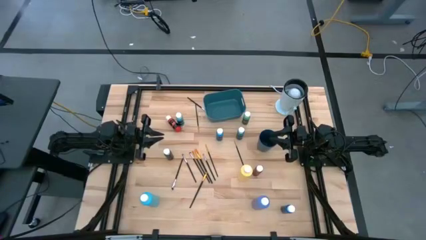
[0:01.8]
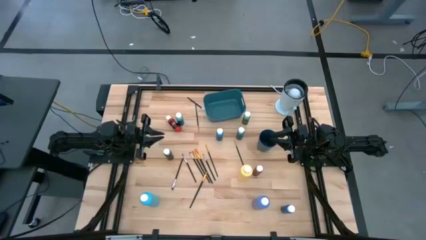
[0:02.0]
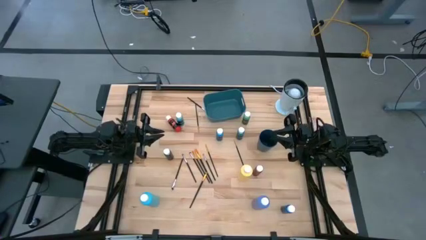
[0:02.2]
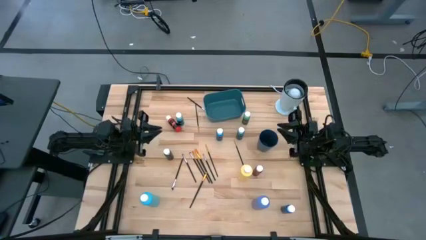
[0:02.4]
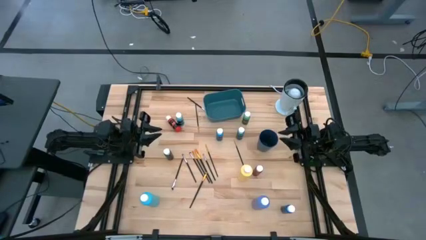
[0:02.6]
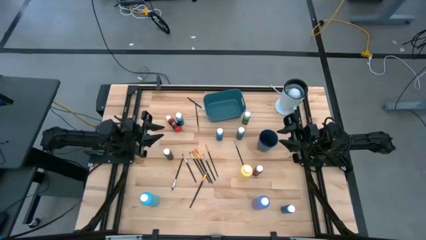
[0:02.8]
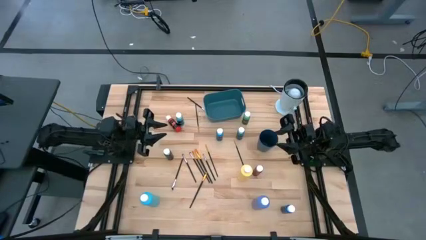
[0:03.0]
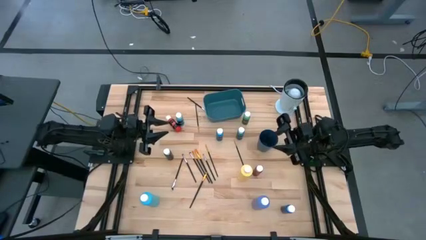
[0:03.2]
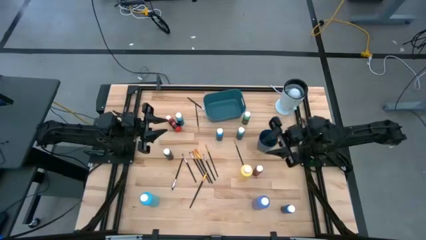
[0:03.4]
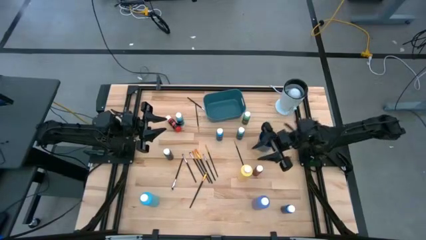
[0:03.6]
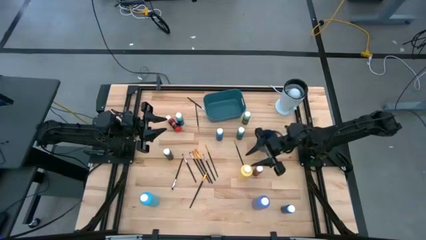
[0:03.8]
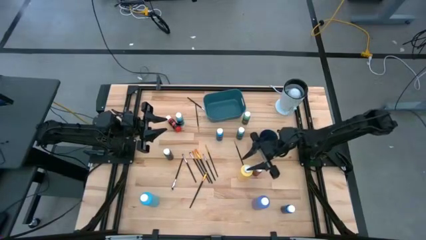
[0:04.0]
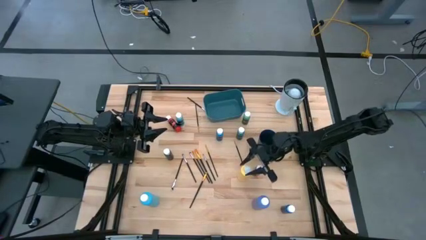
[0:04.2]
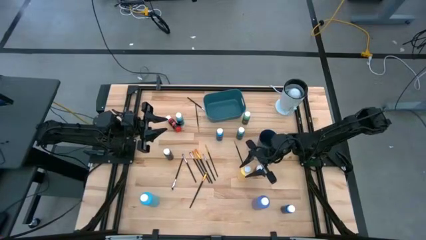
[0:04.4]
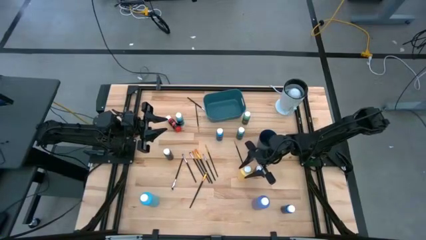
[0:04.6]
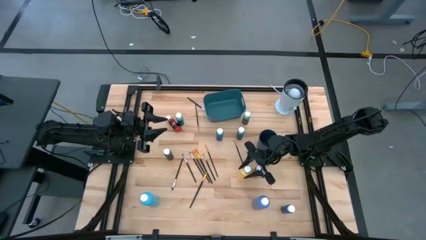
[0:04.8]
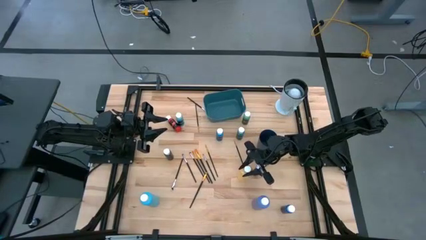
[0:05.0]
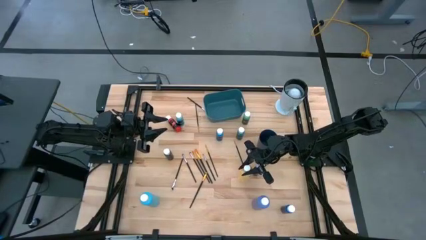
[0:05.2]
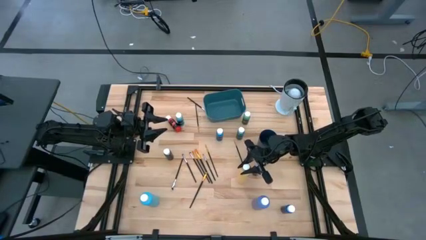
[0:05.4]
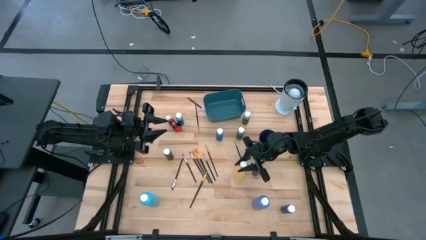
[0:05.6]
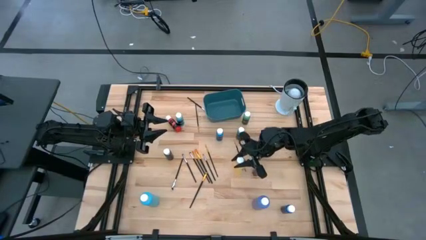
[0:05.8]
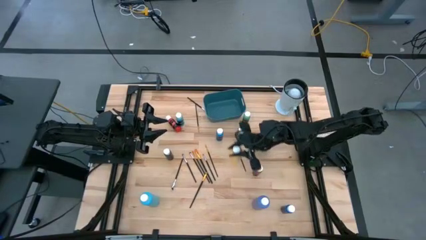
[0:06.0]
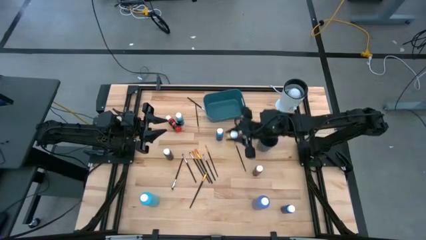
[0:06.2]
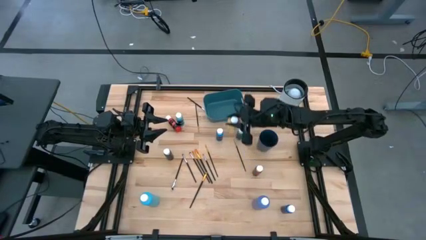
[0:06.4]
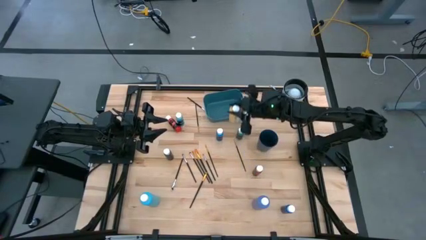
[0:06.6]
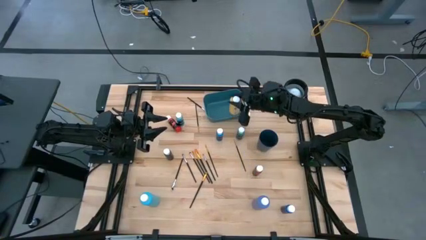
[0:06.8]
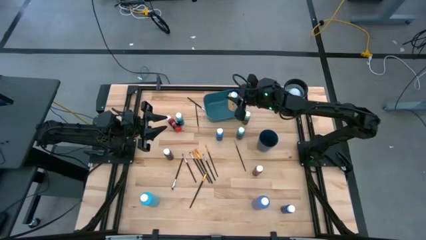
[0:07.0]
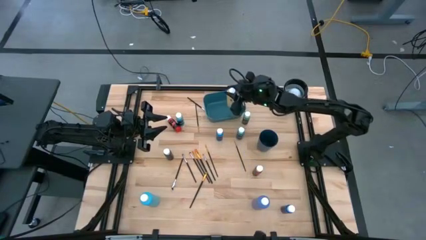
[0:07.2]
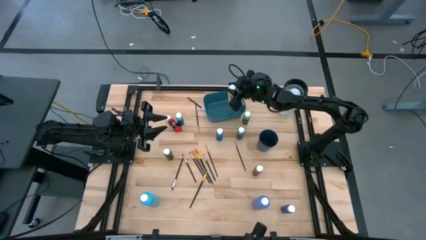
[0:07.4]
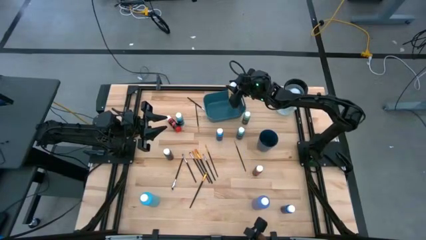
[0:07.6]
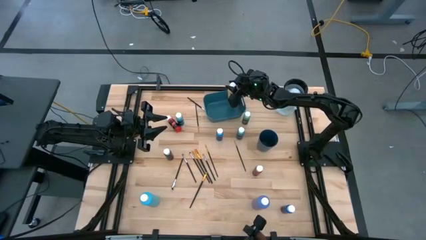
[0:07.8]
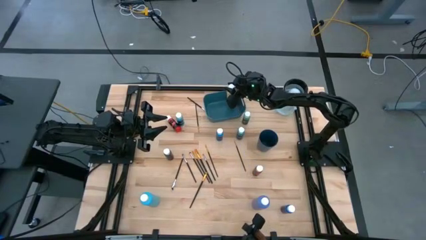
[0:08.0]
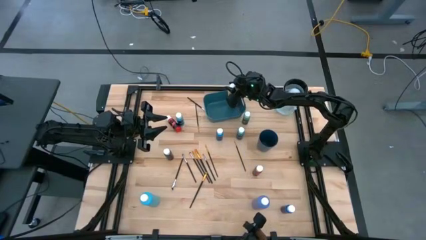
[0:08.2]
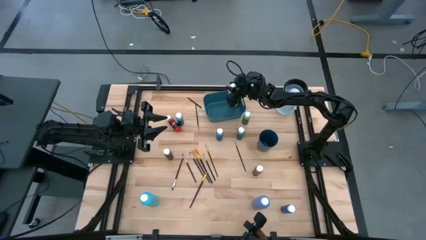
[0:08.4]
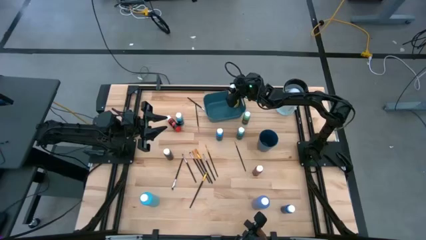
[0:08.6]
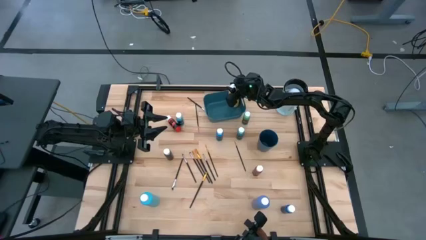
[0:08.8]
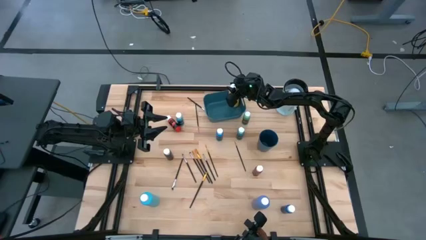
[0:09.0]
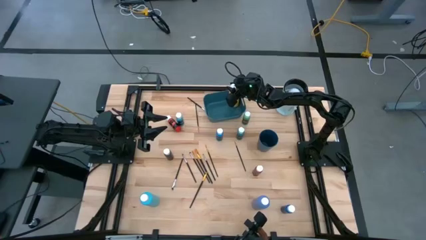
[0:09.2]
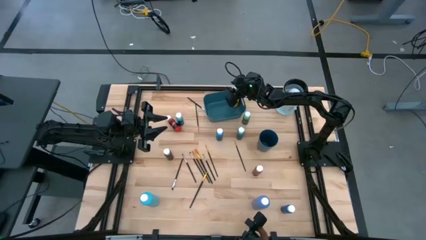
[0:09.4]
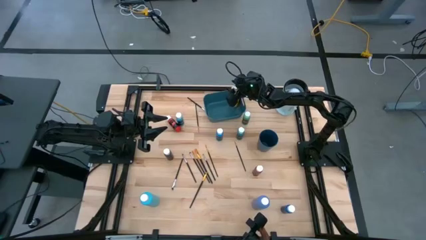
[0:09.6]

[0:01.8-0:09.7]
Task: Pick & Place Paint Supplies
Put the yellow paint bottle into the blue bin

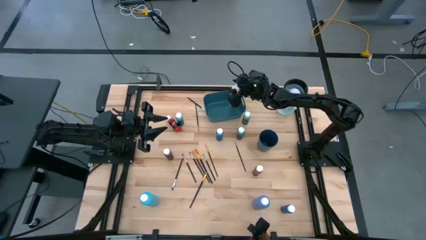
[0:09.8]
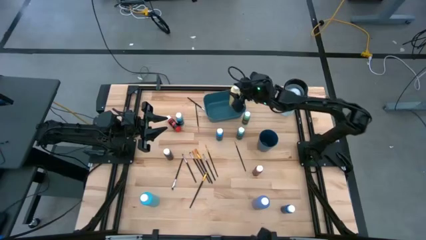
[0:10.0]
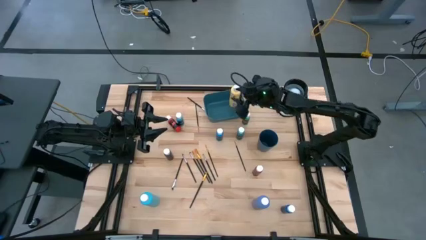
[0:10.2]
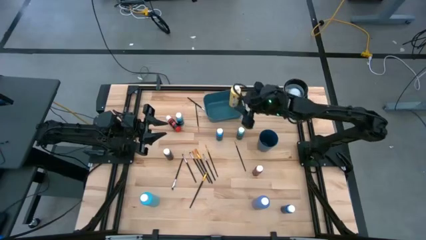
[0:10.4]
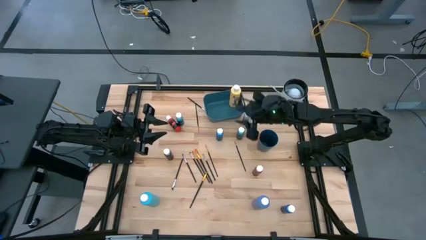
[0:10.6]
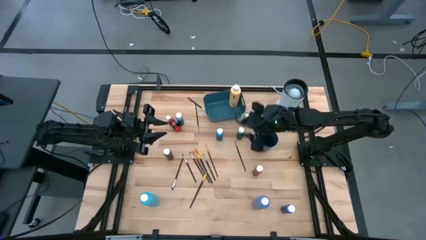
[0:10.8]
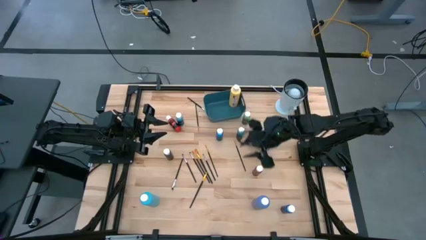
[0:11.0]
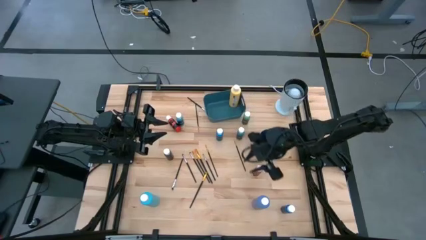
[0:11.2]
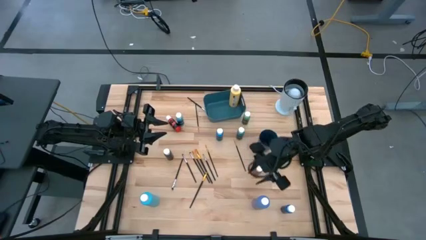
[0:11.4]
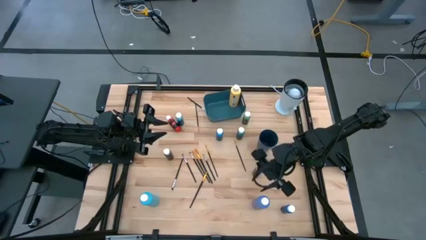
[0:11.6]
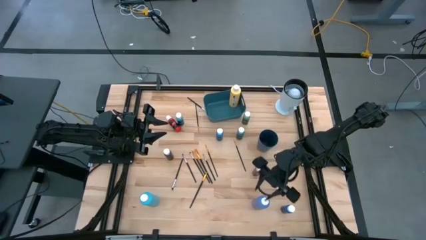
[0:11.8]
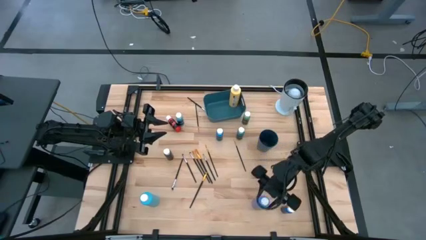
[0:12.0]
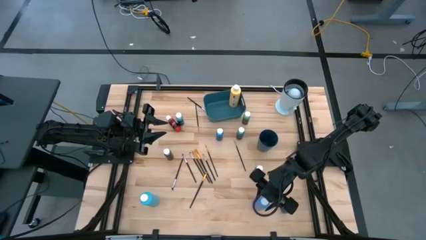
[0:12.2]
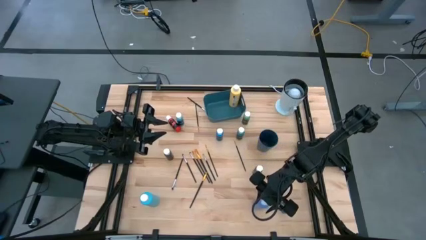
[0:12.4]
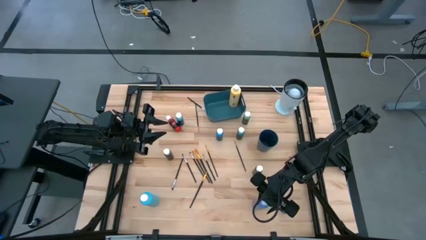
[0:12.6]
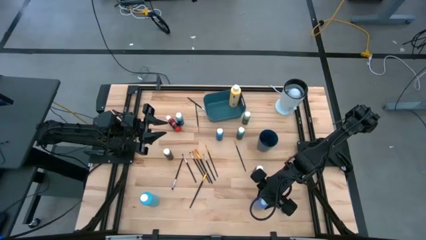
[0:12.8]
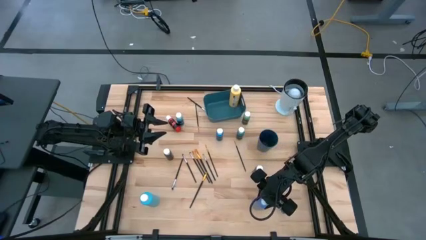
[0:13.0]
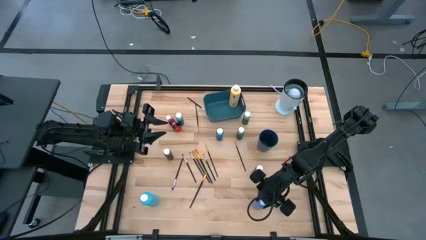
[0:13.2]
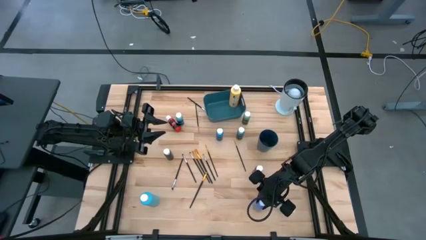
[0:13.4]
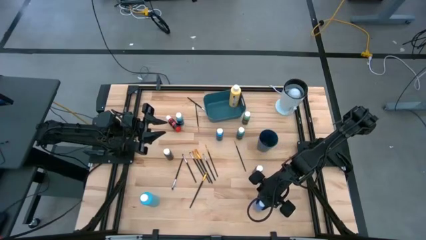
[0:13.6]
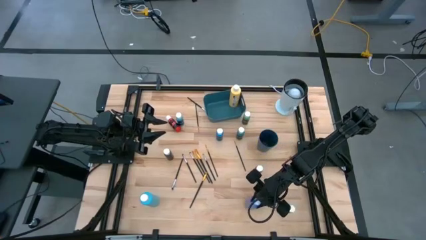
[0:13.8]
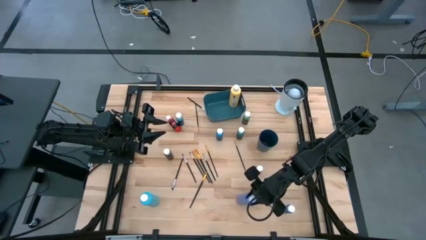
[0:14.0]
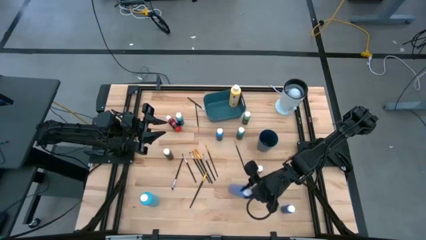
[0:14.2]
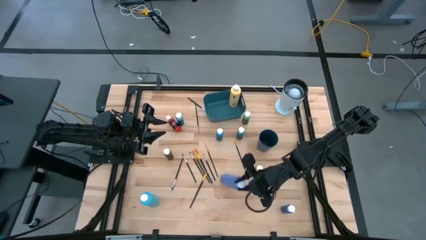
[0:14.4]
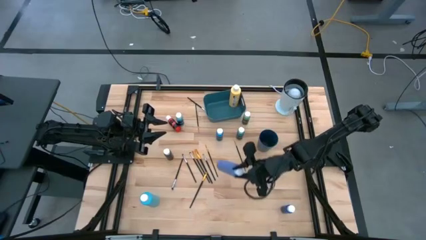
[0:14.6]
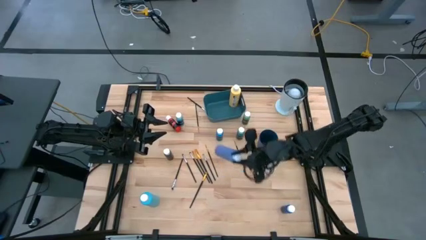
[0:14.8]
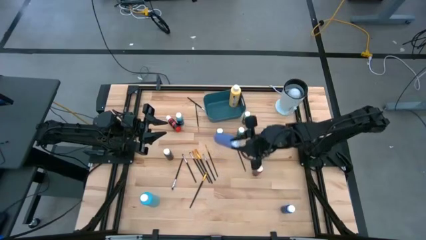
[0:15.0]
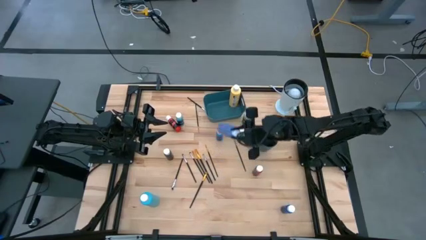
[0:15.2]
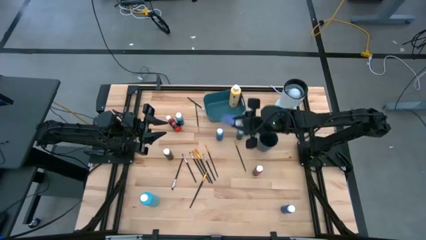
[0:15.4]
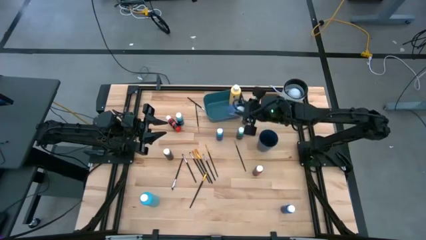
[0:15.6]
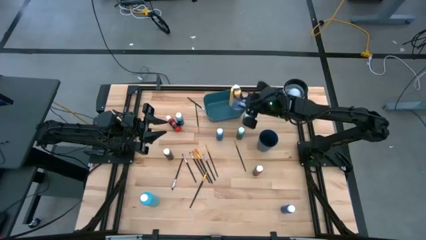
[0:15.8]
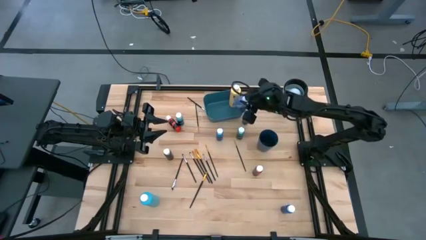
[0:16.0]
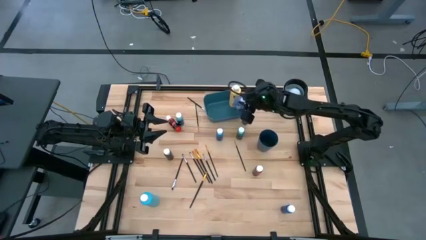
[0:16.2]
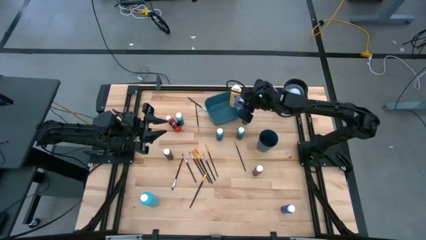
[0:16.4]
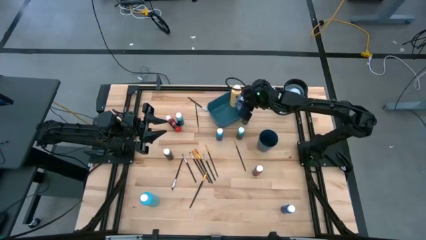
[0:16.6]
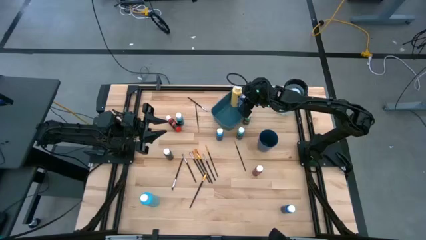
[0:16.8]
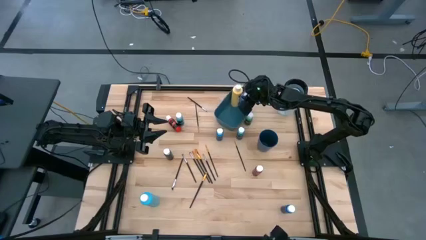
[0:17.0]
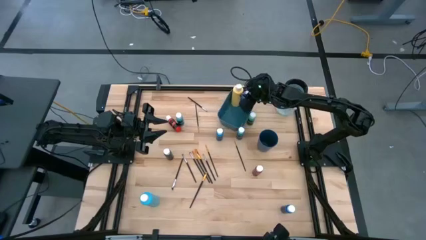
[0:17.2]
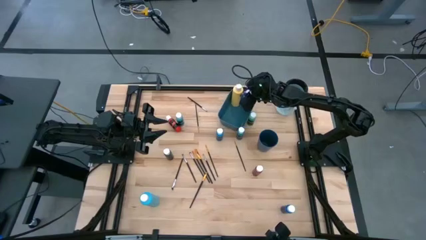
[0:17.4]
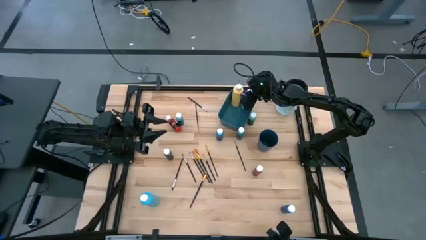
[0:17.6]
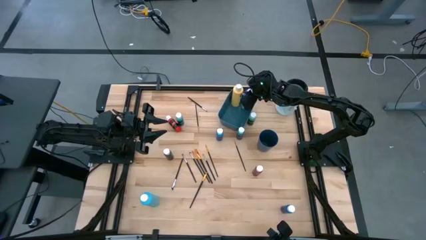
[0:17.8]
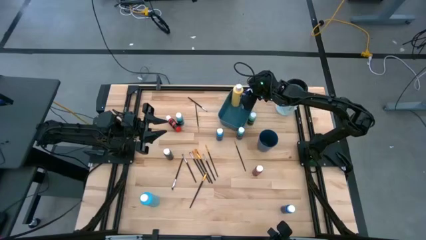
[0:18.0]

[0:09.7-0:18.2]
Put the purple paint bottle into the blue bin
